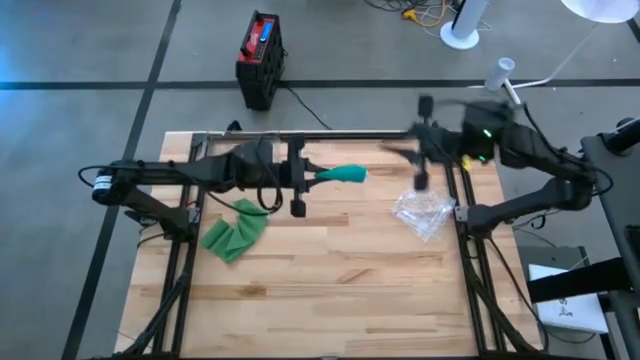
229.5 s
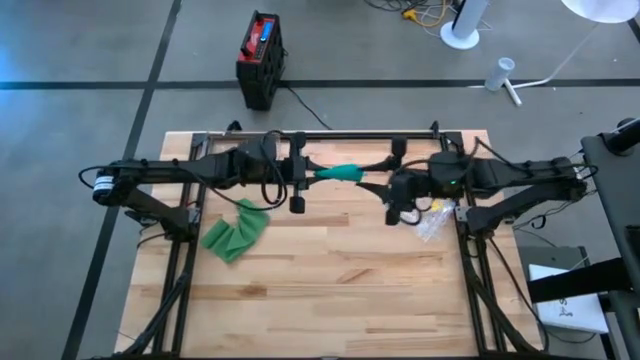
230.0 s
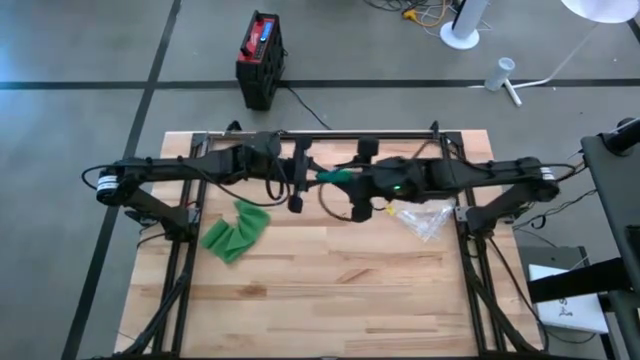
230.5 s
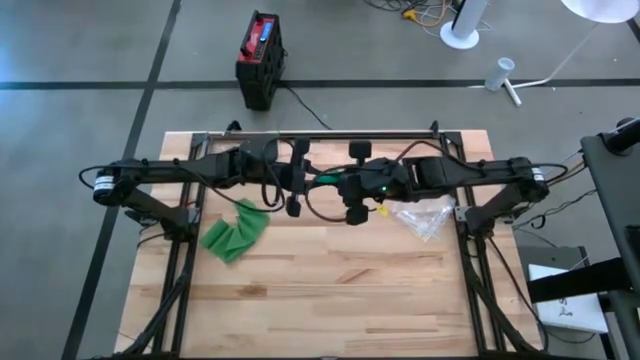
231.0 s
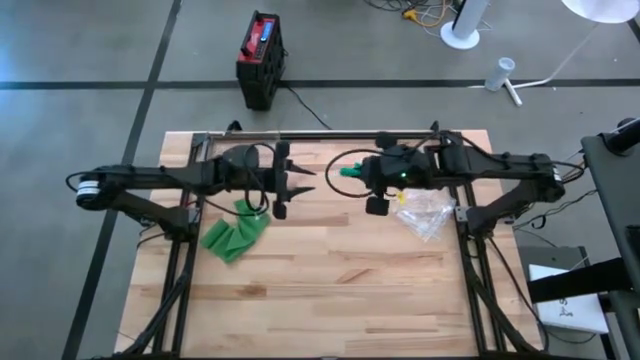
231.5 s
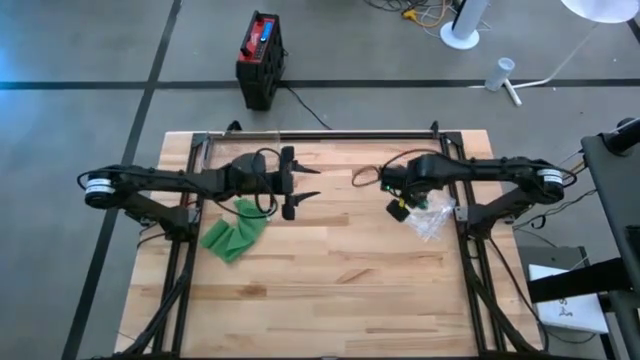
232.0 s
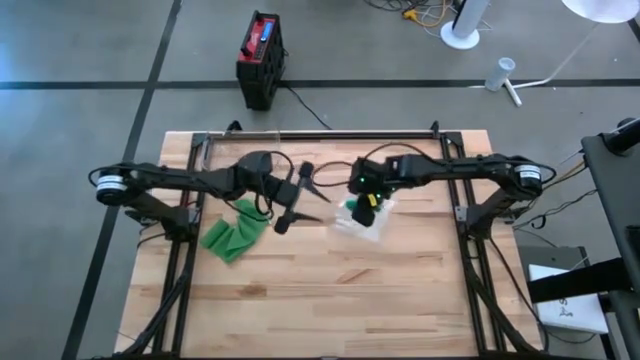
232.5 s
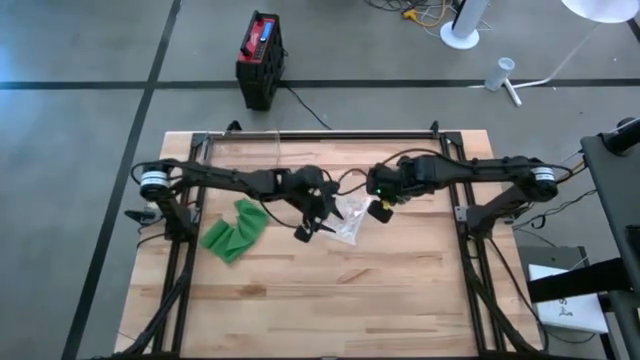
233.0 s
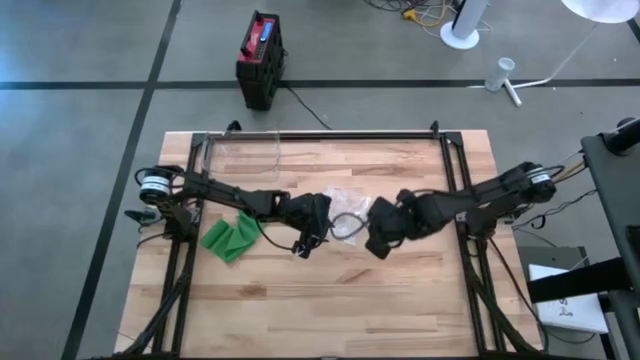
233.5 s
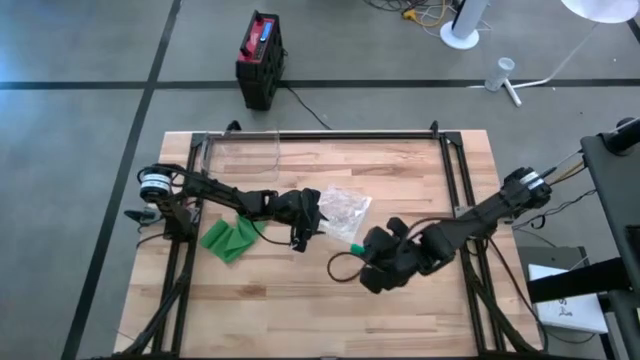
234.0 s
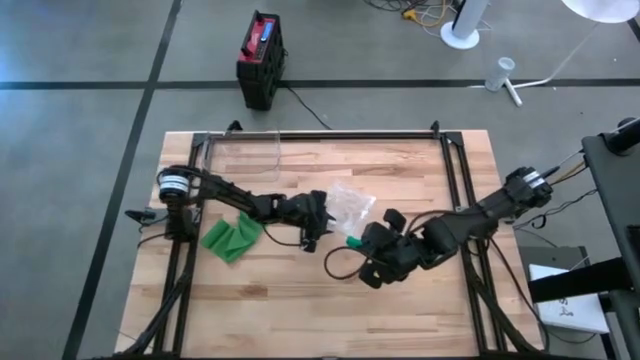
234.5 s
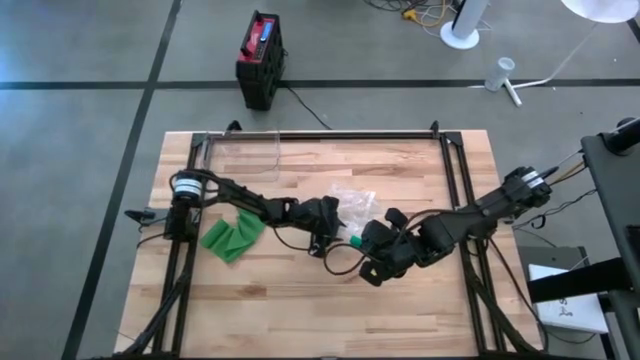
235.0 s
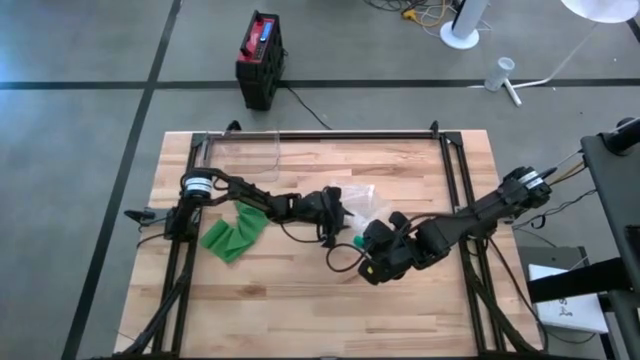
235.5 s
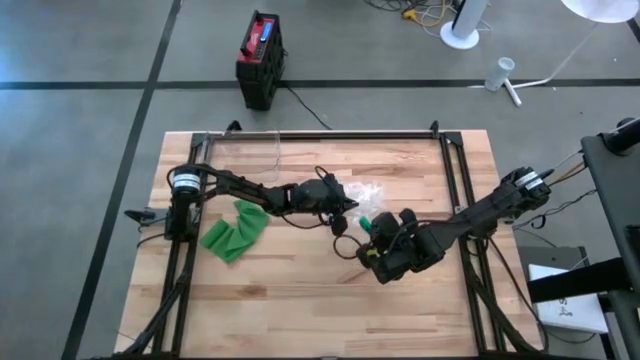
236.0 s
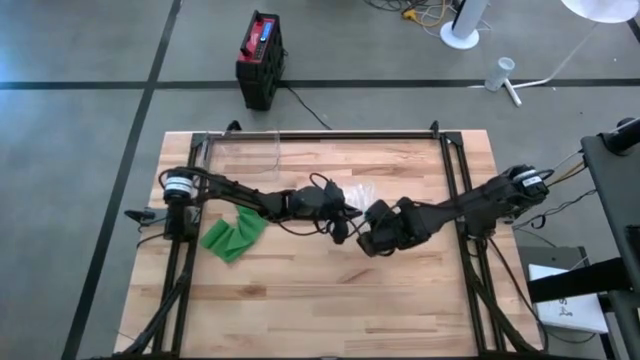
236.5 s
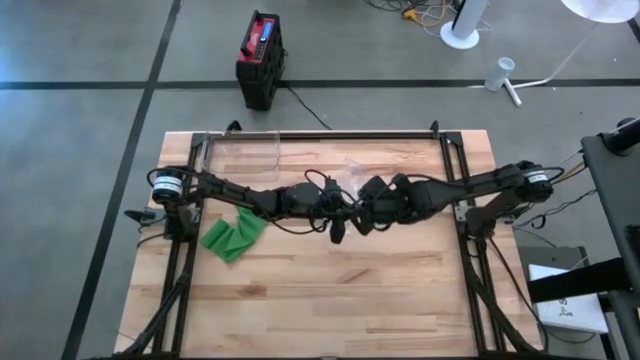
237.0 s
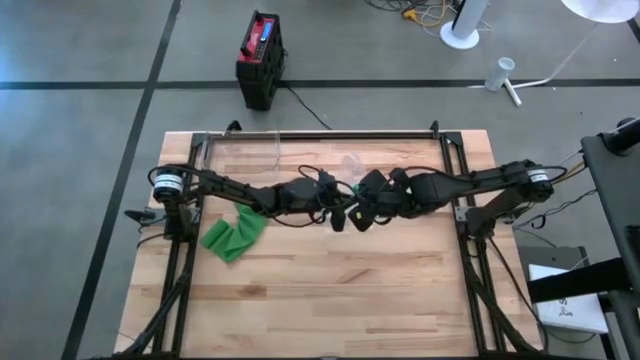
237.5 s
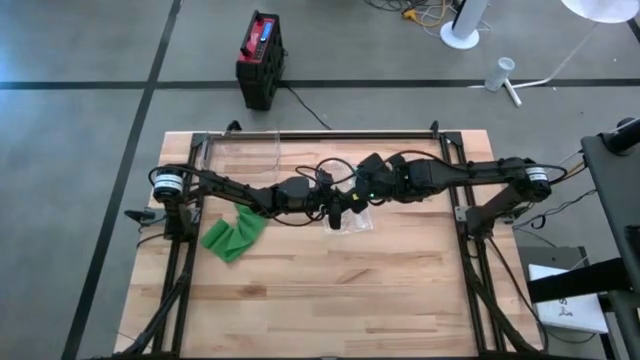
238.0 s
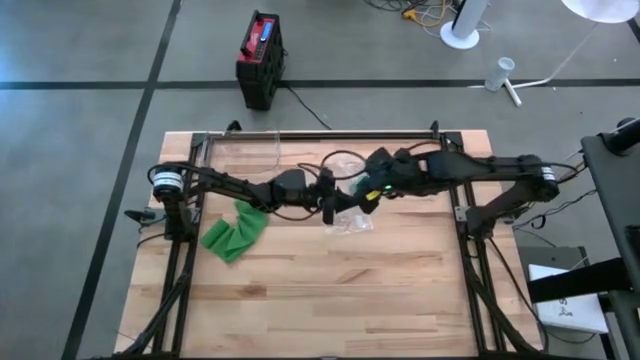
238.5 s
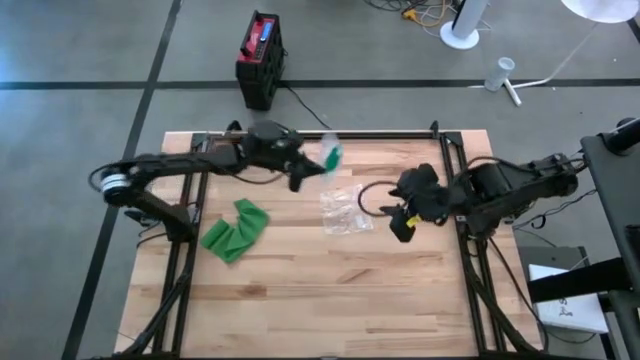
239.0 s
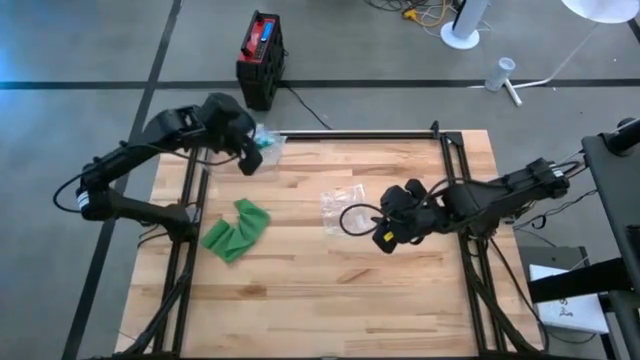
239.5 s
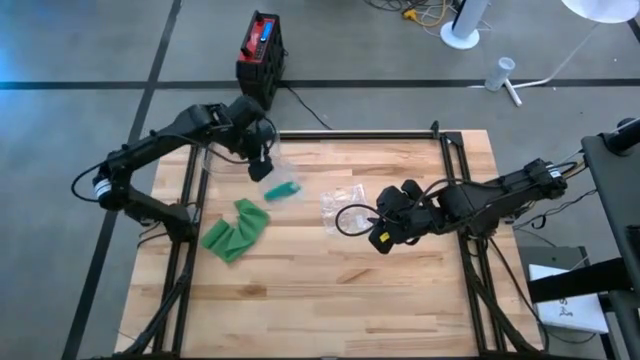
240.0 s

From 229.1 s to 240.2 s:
Task: Roll bandage
Put the blue bandage into the top transparent zip bag

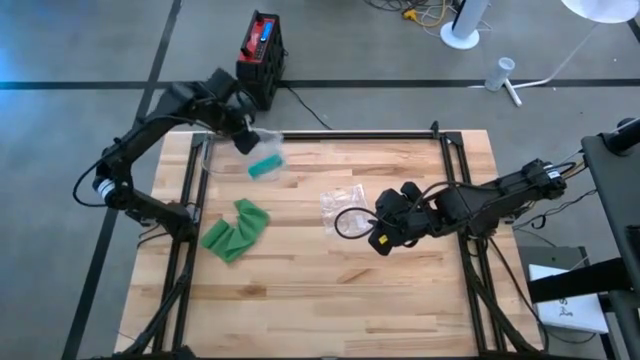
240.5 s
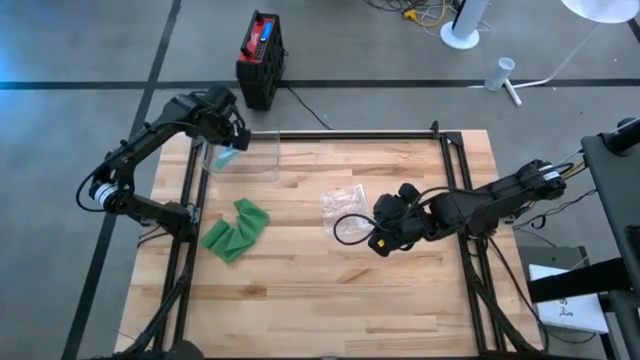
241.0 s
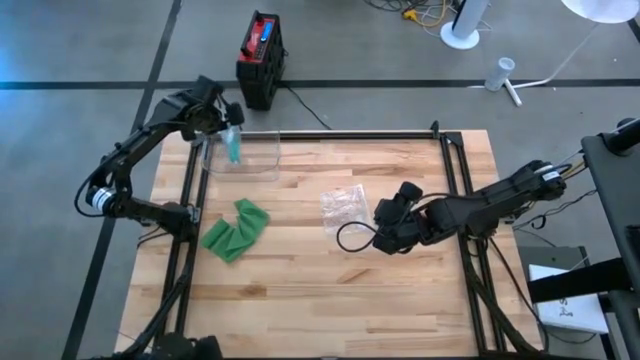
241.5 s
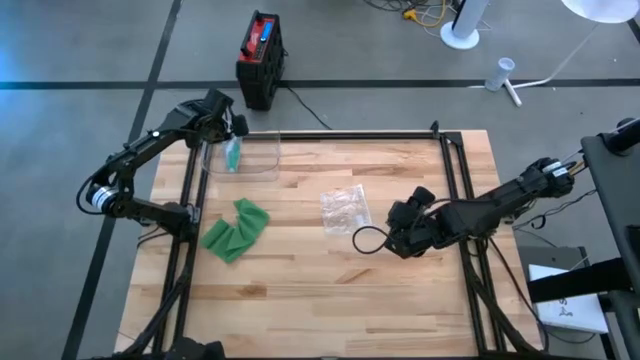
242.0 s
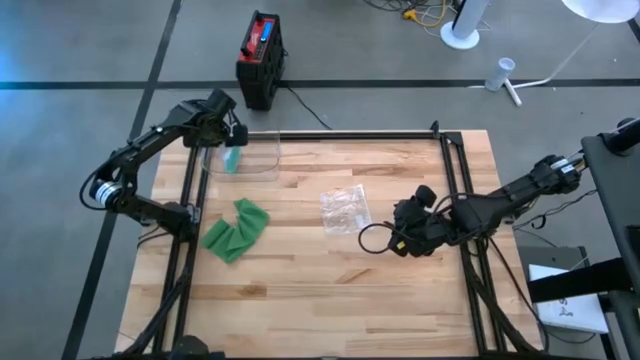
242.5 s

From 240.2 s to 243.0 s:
Put the transparent zip bag containing the blue bandage into the transparent bin

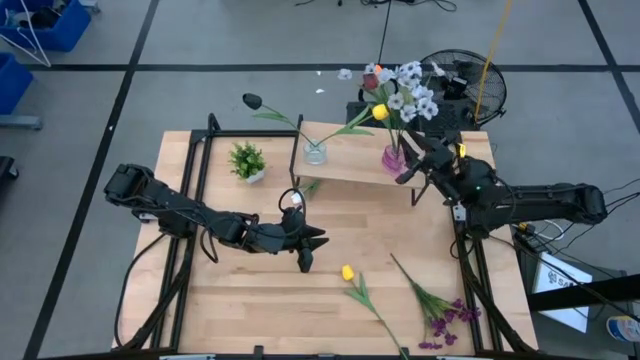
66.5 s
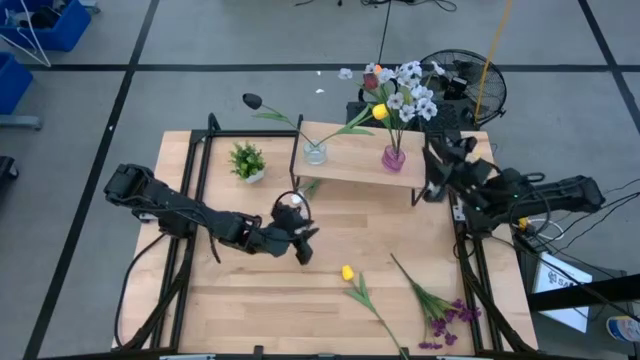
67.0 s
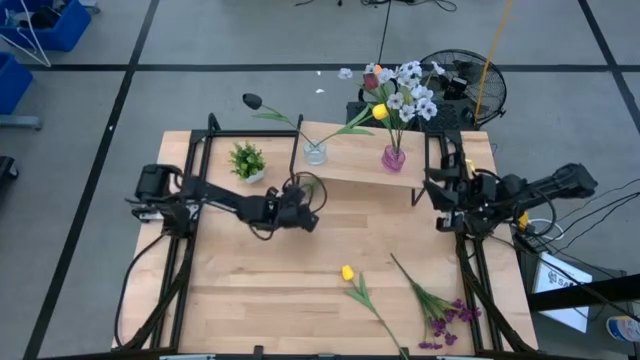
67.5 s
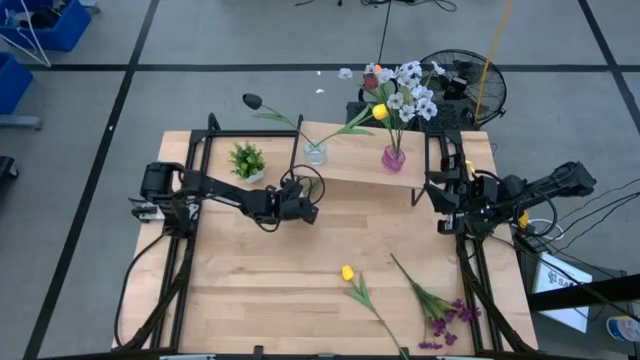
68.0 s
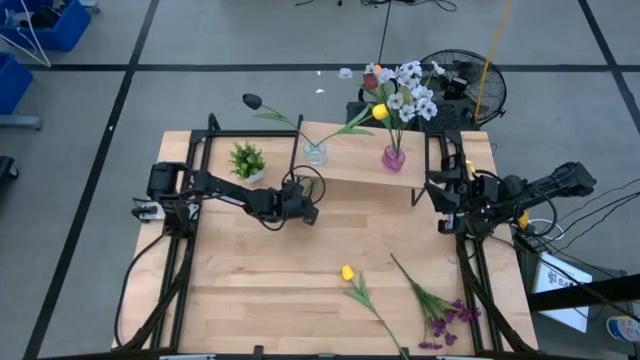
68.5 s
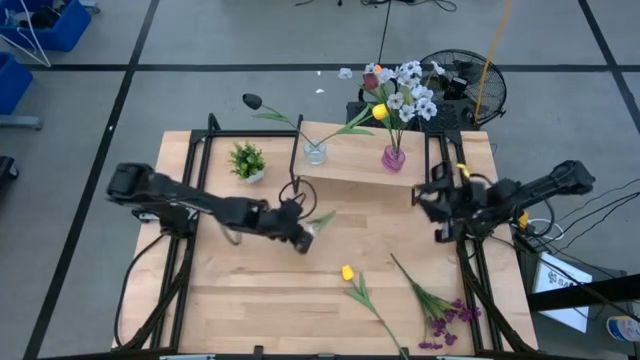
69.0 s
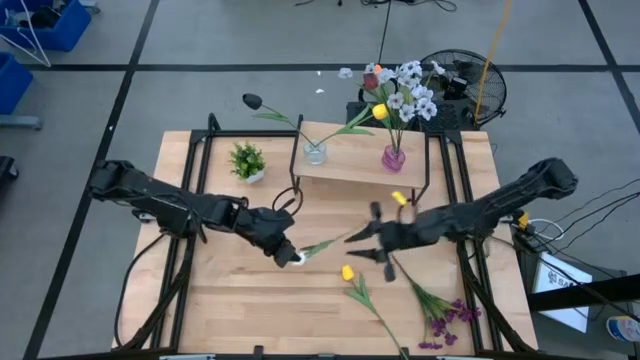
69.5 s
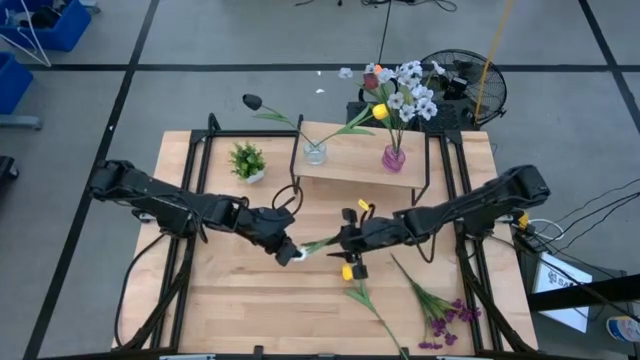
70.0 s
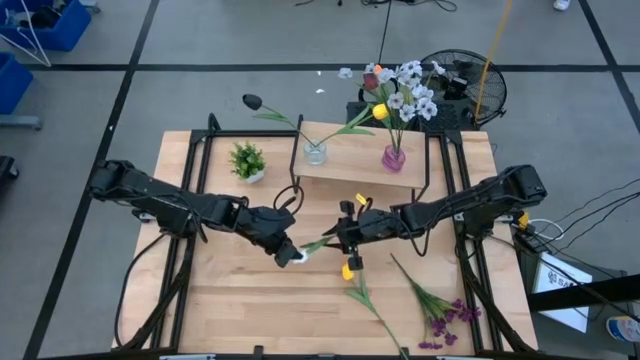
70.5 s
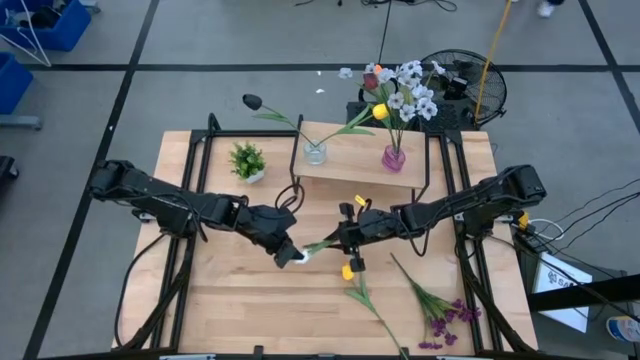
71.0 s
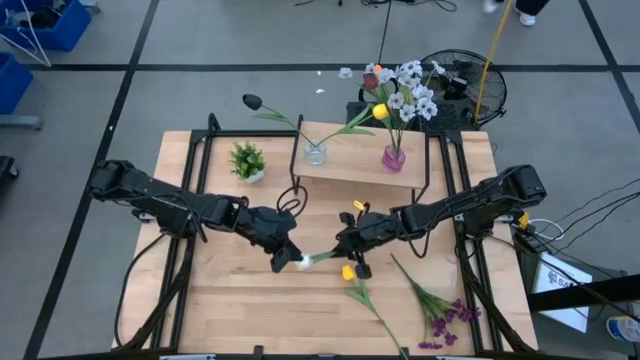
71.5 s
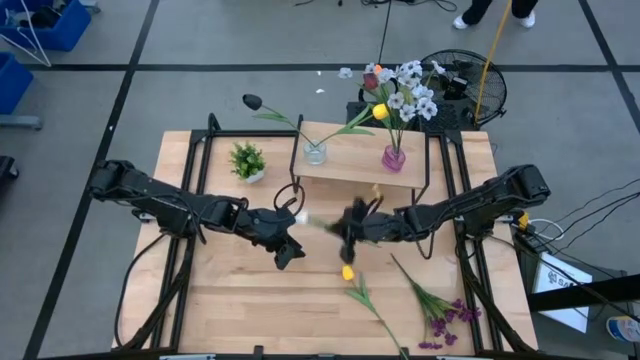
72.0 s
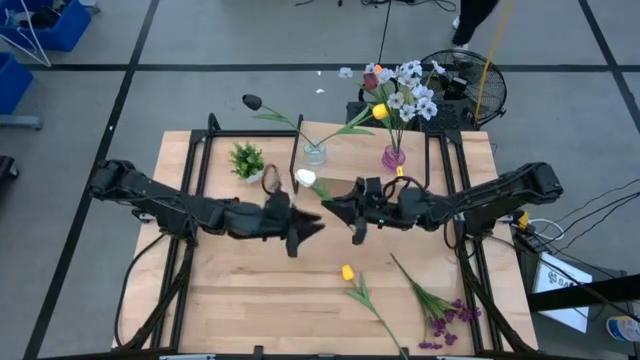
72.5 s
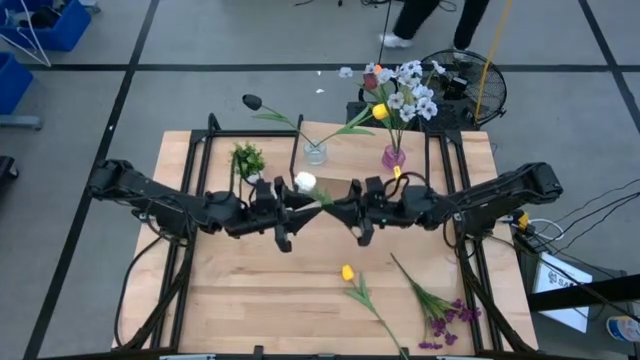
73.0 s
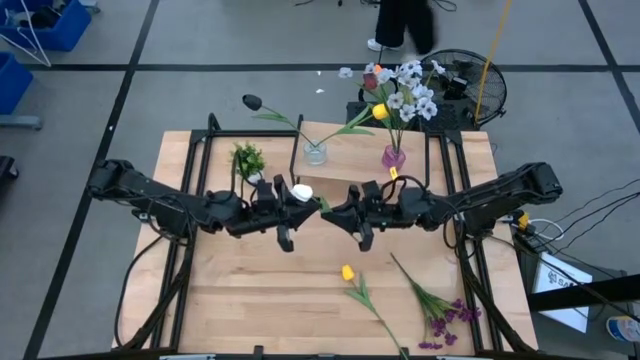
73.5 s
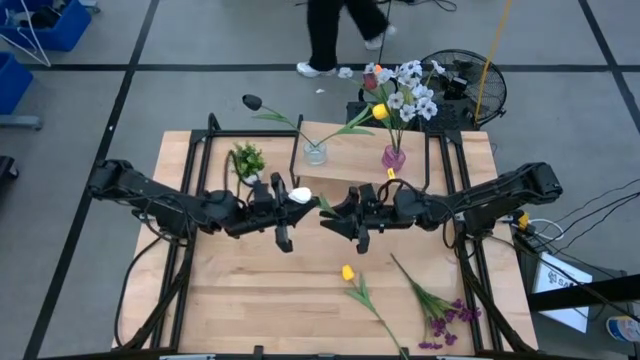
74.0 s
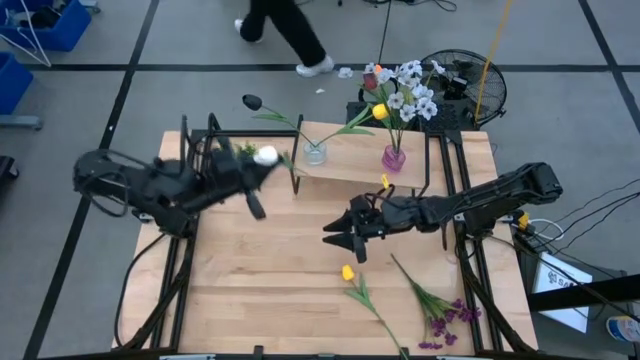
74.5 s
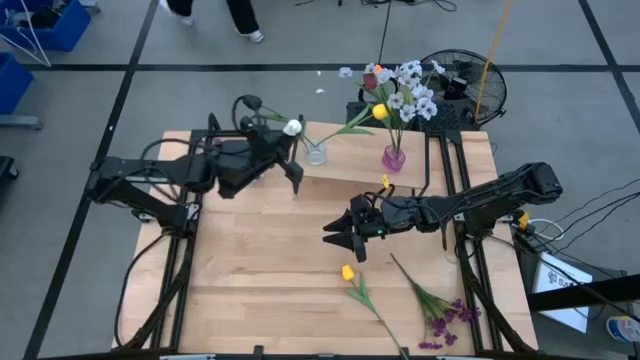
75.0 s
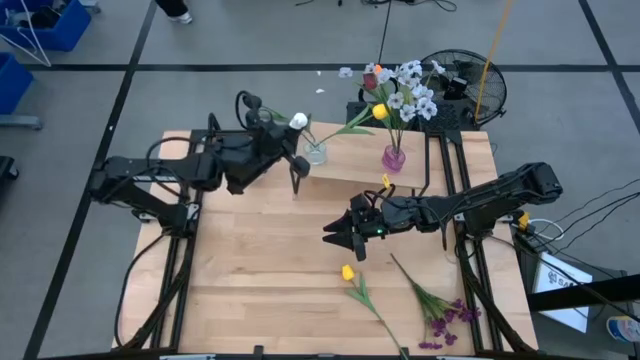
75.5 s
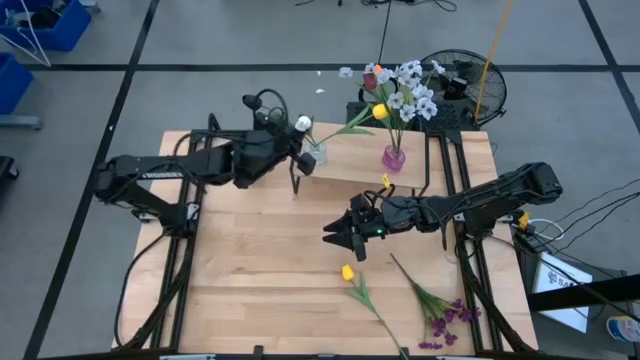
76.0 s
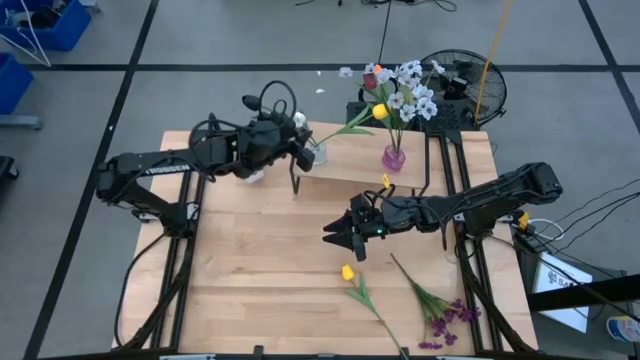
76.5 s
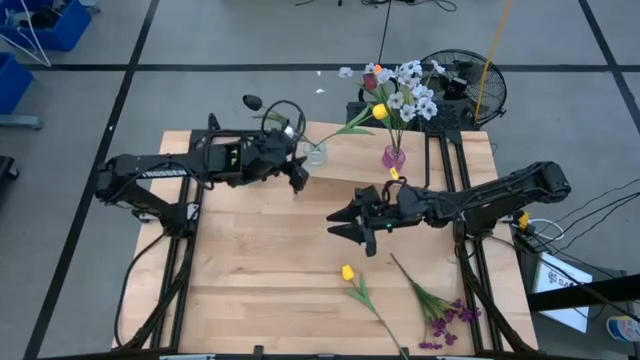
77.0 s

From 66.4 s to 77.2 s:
Task: Pick and place flowers into a vace then onto a shelf
Put the white tulip into the transparent vase
